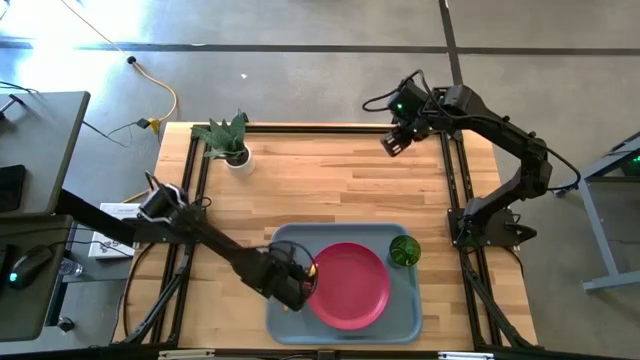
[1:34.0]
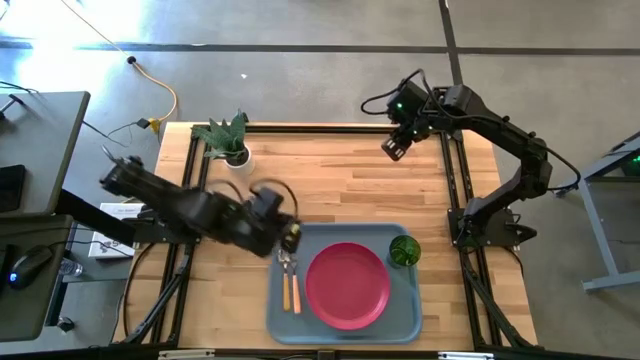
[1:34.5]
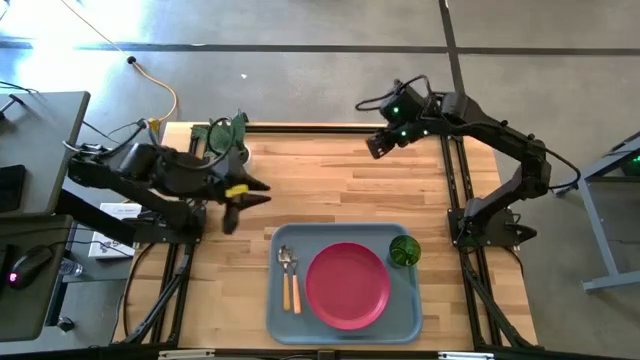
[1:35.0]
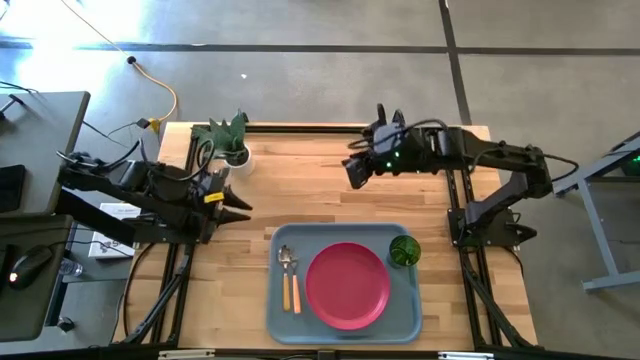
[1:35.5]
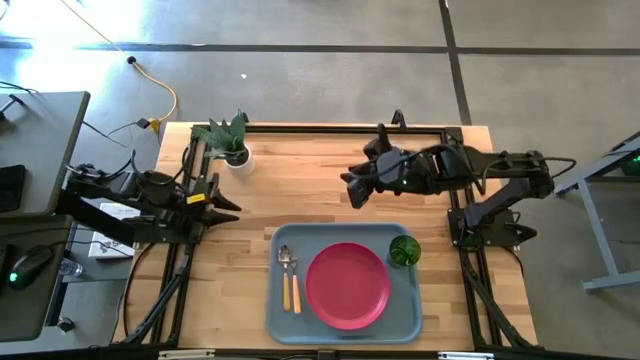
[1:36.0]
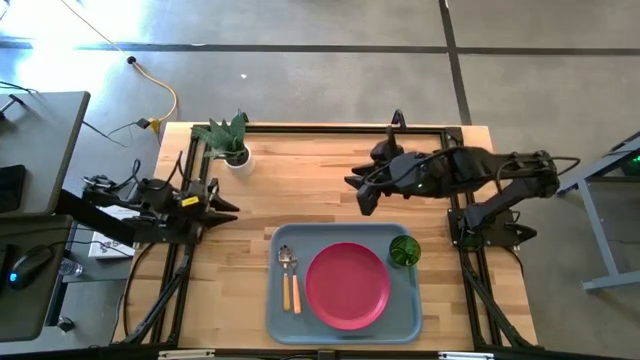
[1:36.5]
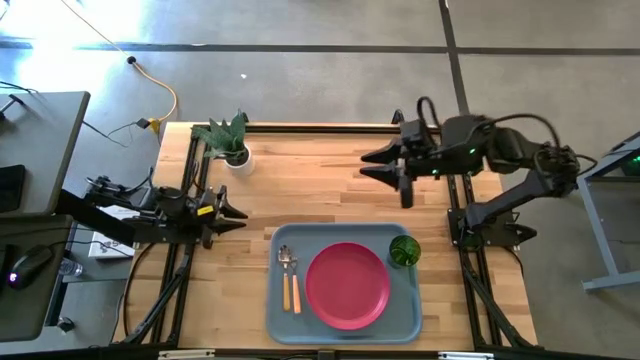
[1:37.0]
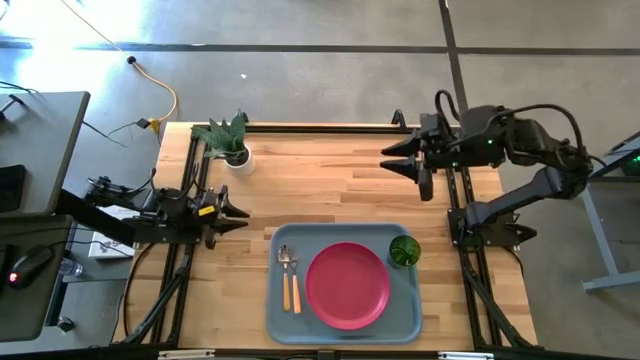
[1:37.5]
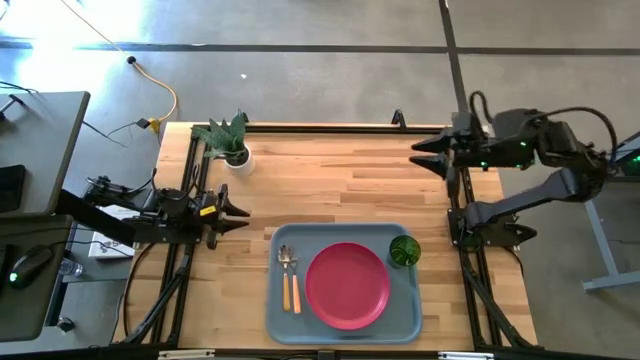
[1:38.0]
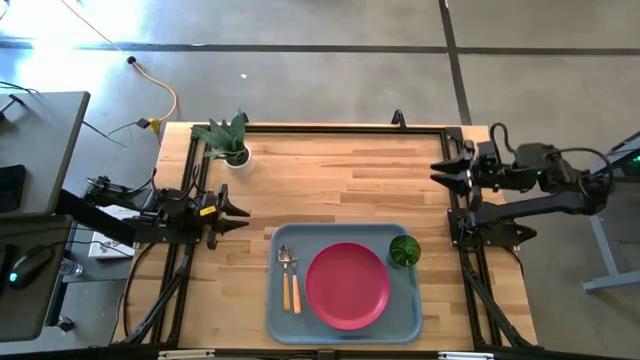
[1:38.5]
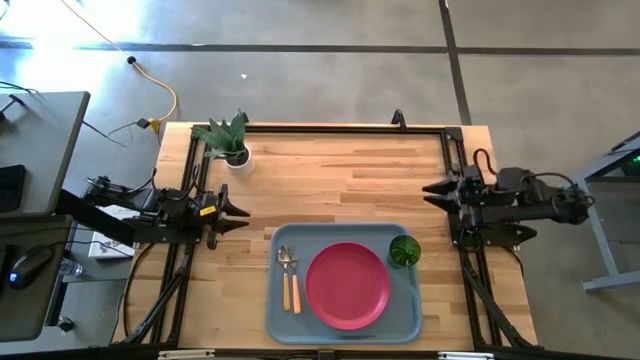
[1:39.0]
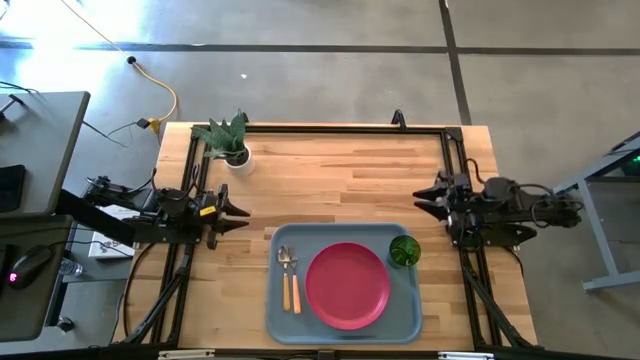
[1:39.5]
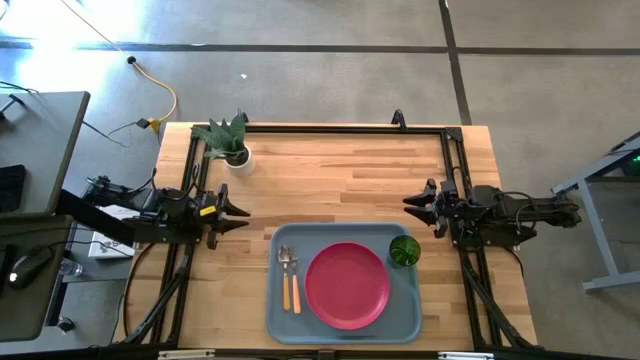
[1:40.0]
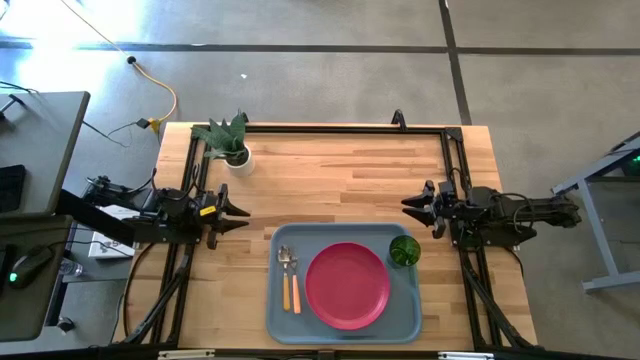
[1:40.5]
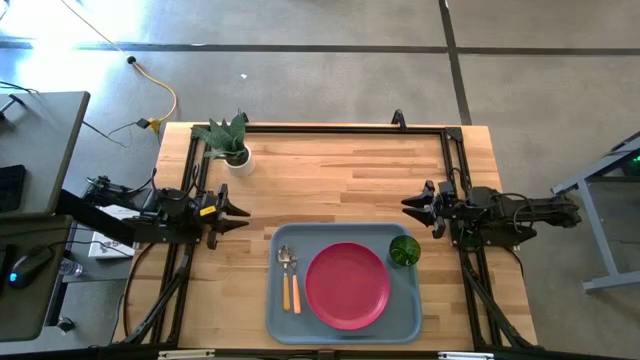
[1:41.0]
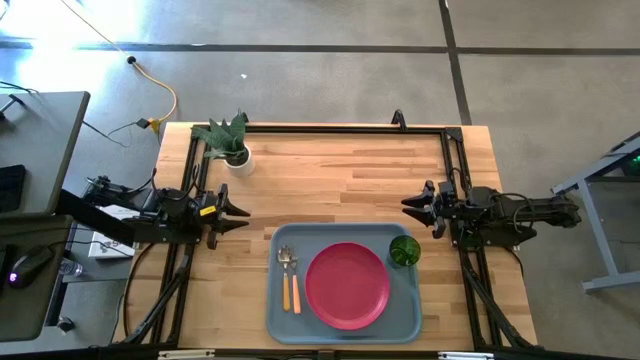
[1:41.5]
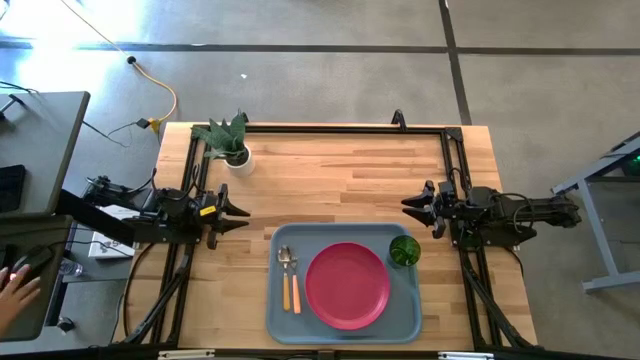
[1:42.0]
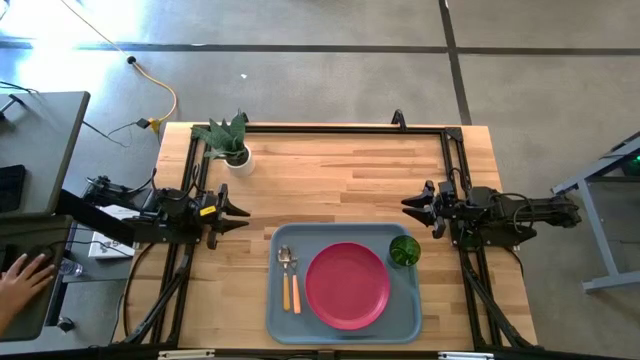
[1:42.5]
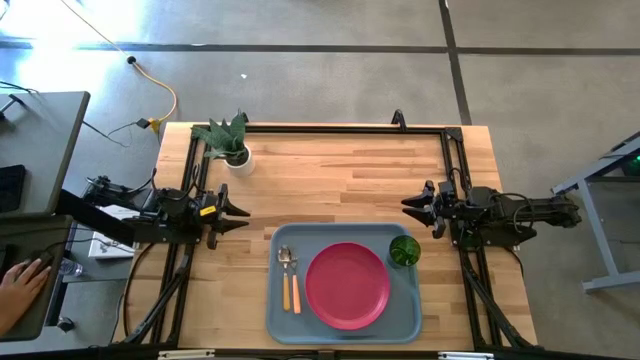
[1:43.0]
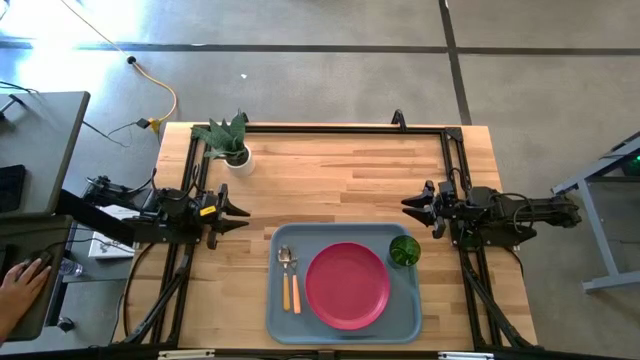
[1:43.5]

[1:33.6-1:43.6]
Task: Pick and place plate/cup/fork/spoon on tray
Return to Home Position

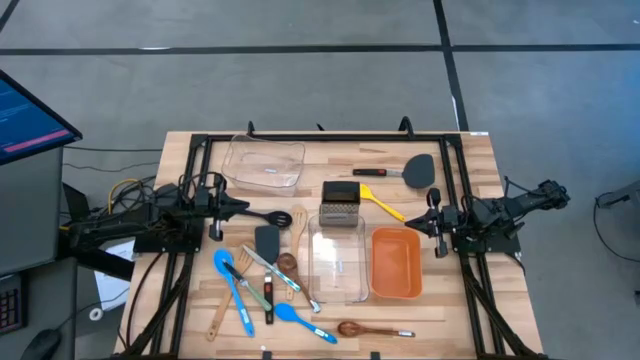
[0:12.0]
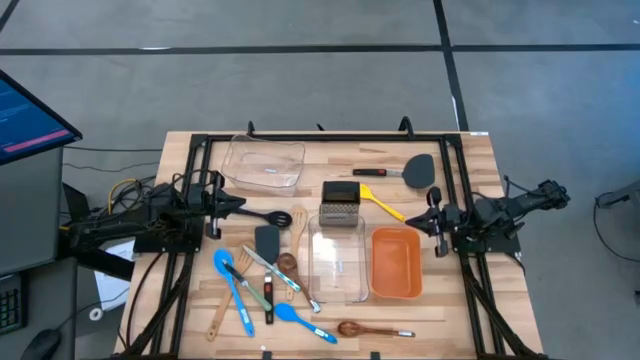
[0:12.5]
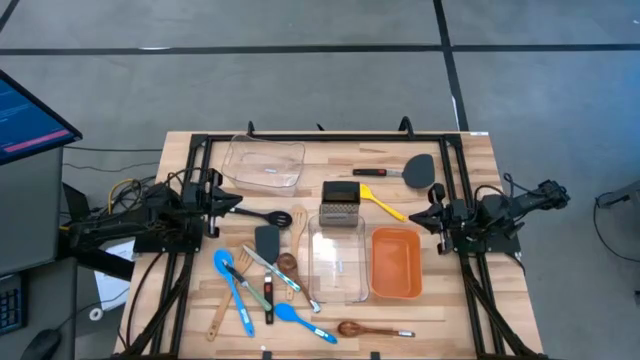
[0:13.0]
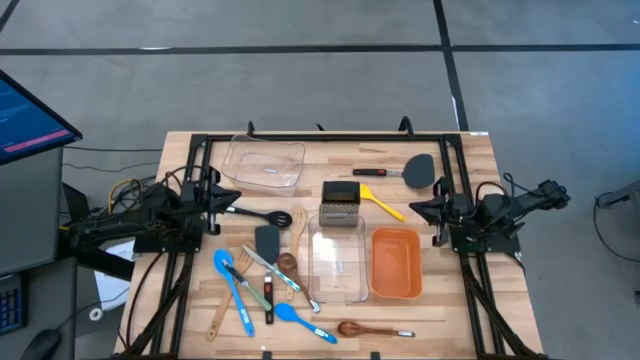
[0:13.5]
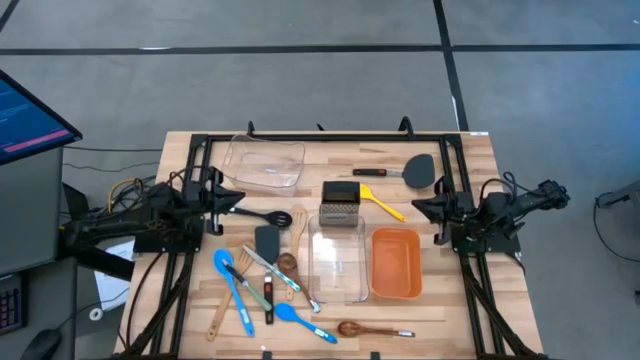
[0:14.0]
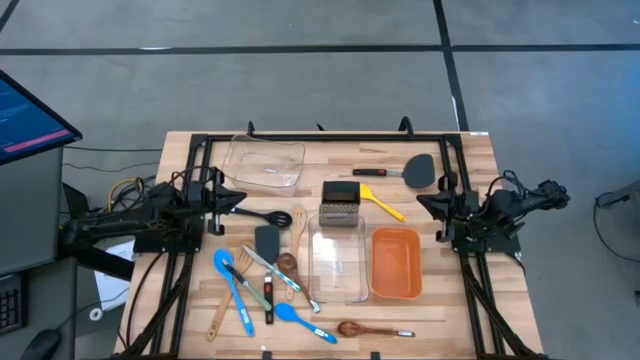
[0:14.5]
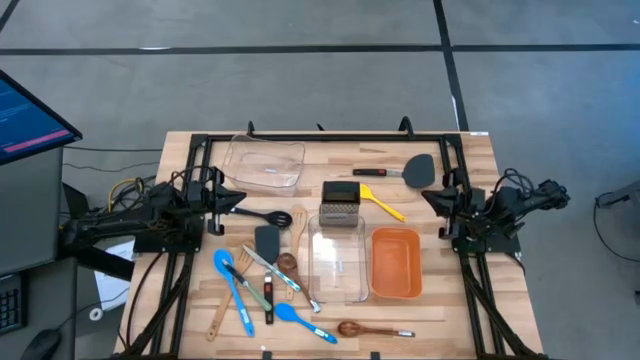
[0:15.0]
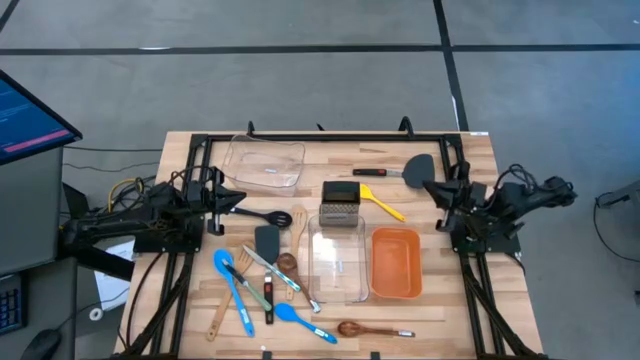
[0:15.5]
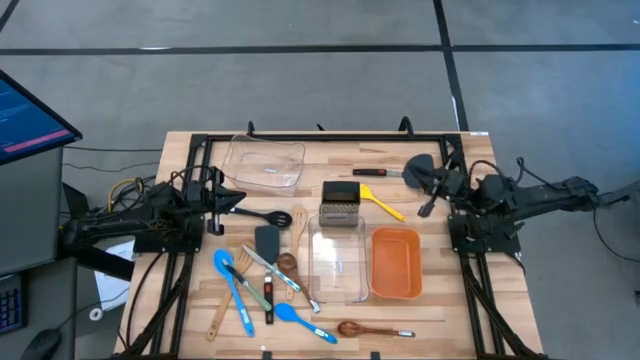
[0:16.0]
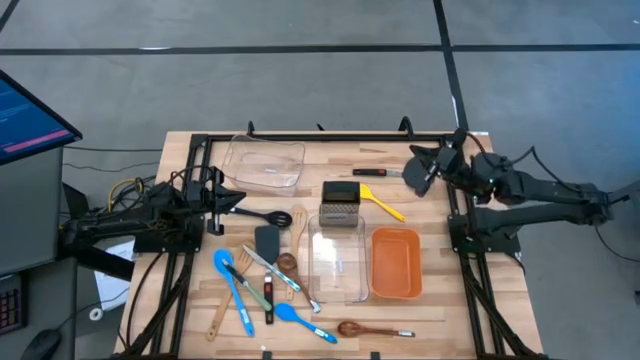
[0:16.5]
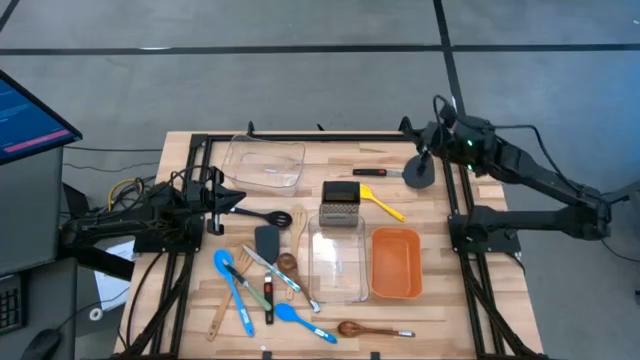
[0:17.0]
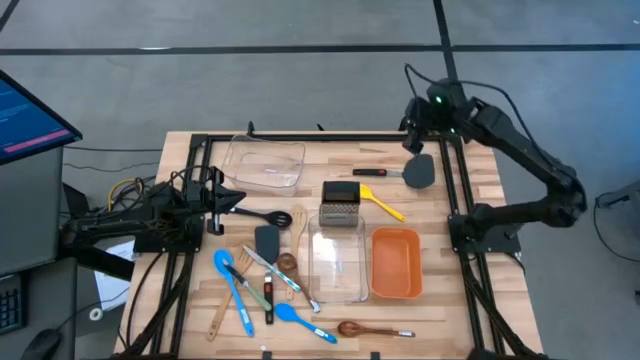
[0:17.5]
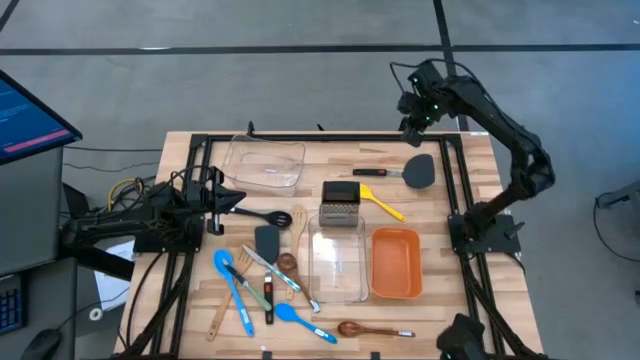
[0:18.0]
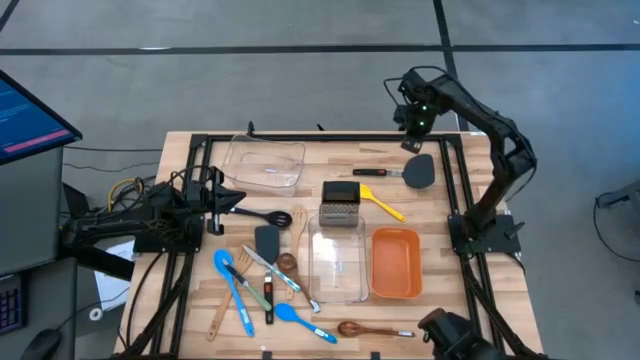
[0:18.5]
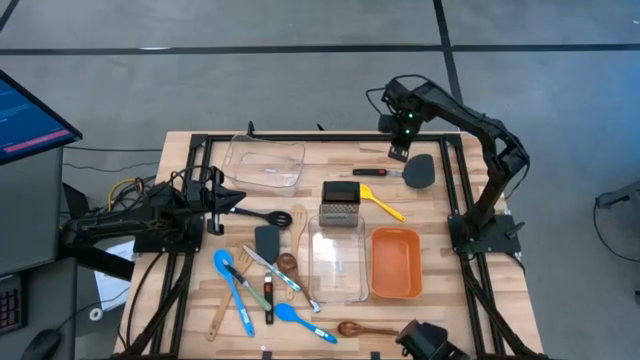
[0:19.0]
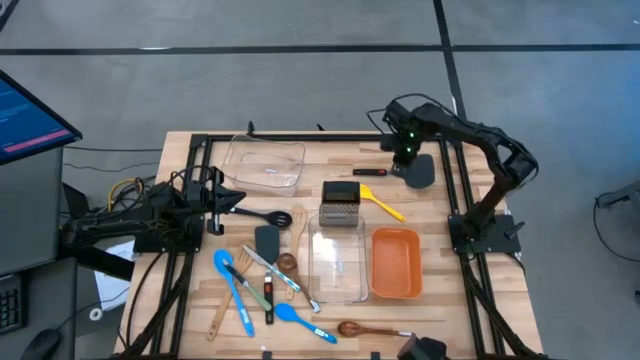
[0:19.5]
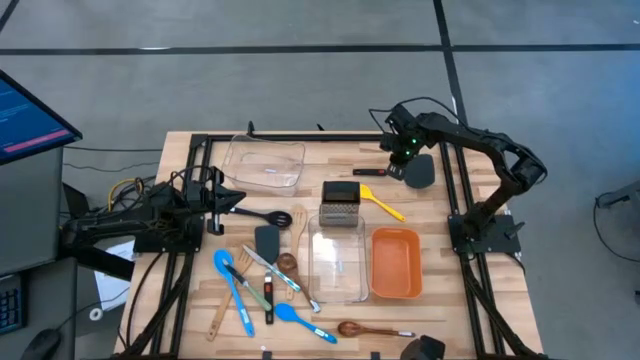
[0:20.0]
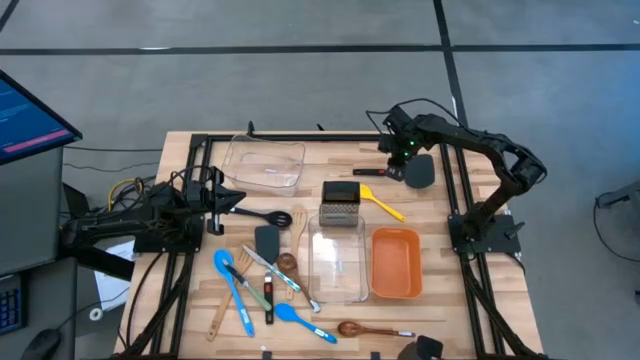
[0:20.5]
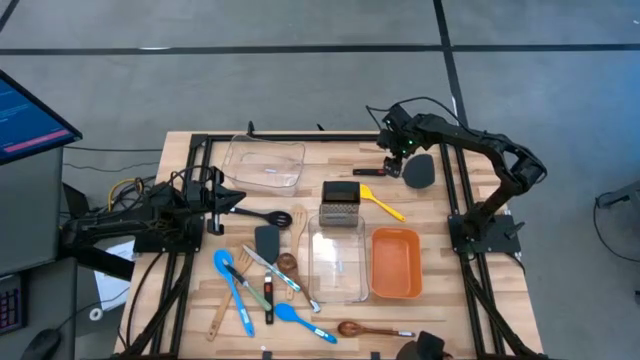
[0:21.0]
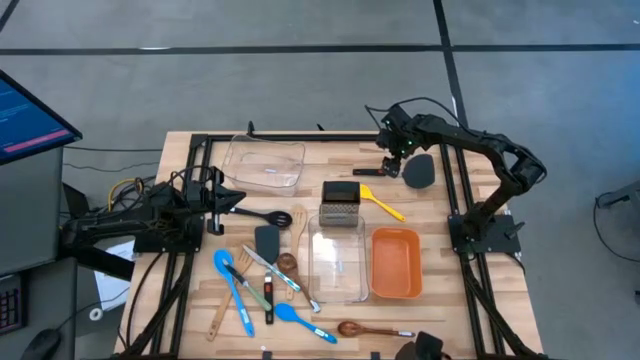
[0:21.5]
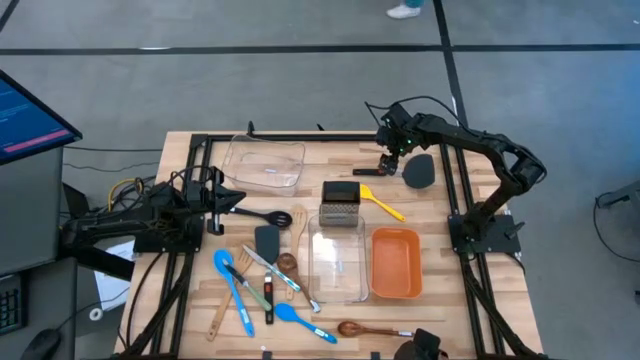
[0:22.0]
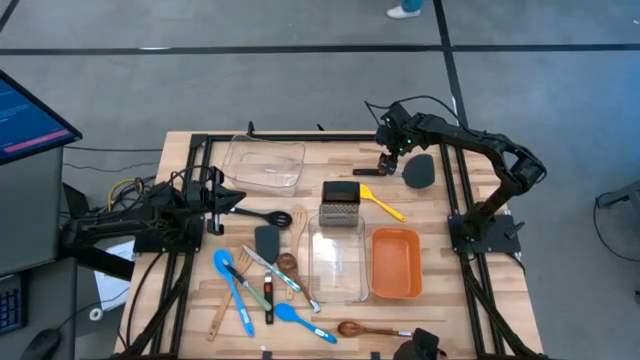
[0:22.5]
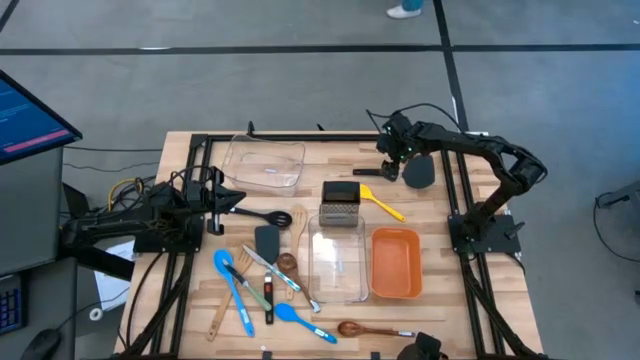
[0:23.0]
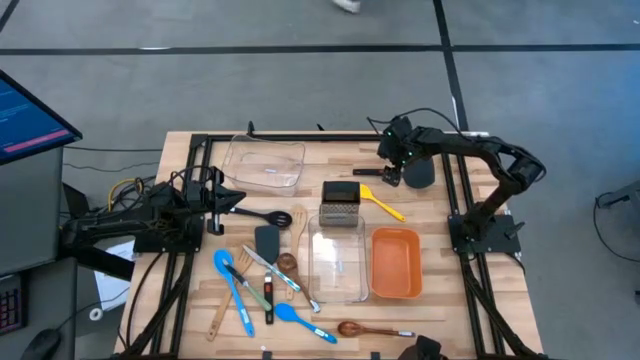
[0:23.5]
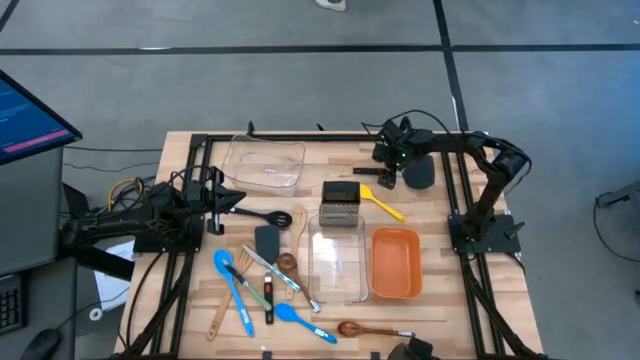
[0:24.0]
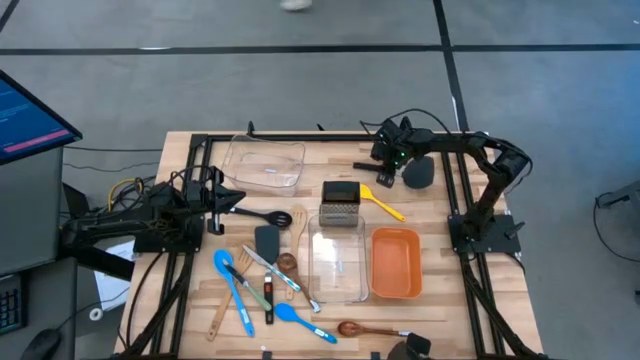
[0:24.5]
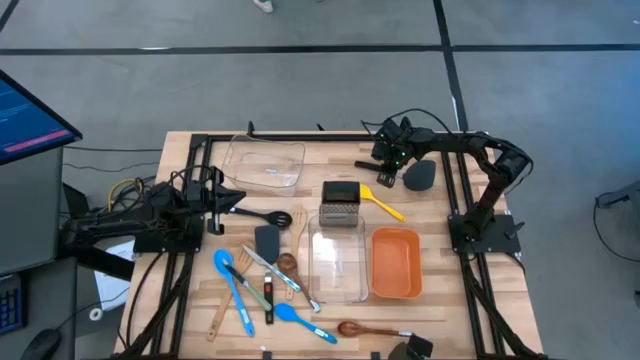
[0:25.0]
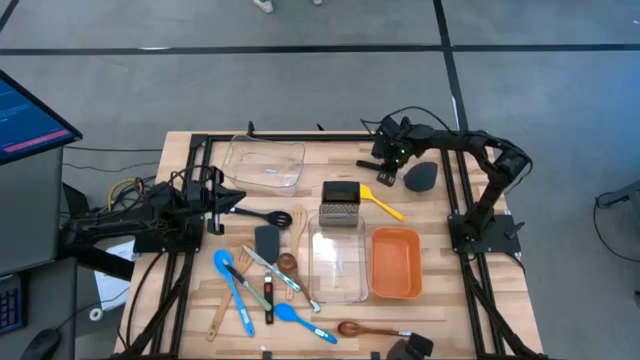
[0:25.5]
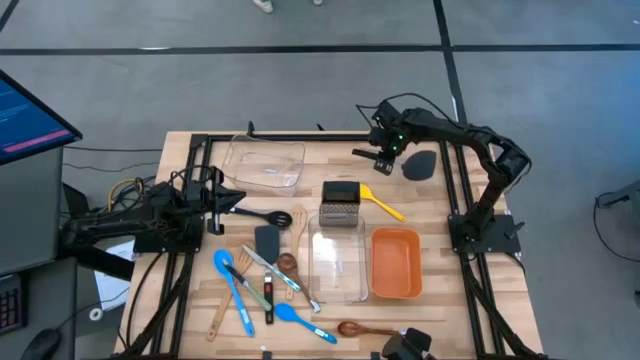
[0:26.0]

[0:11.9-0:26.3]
Task: Pick & Place Kitchen Items
Put the top black spatula into the bottom transparent bin
